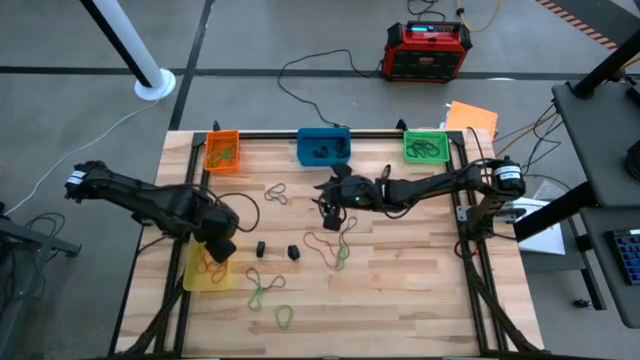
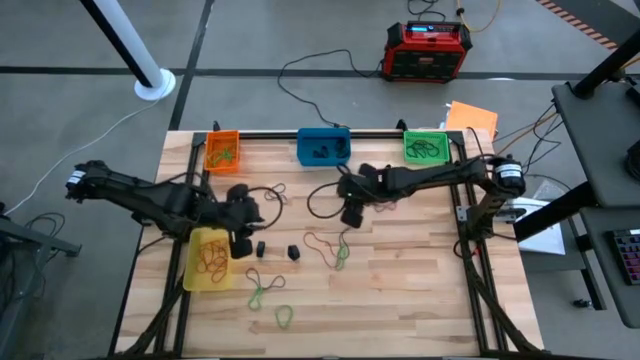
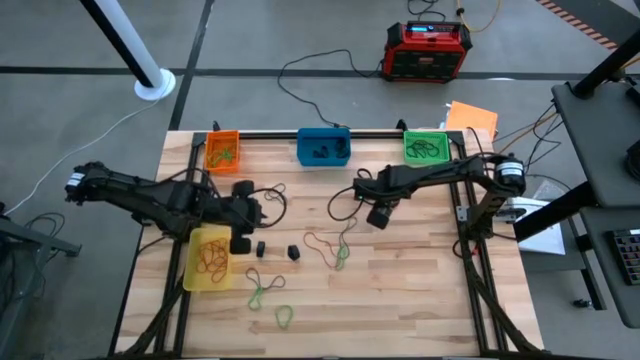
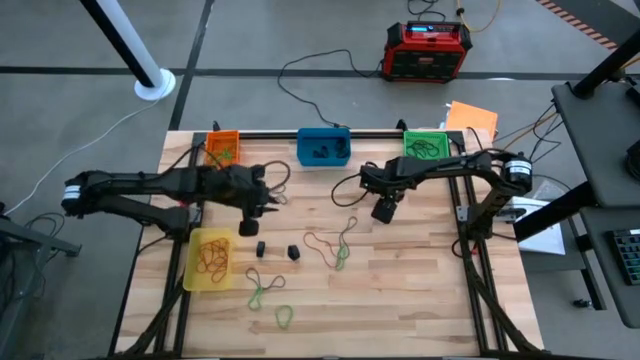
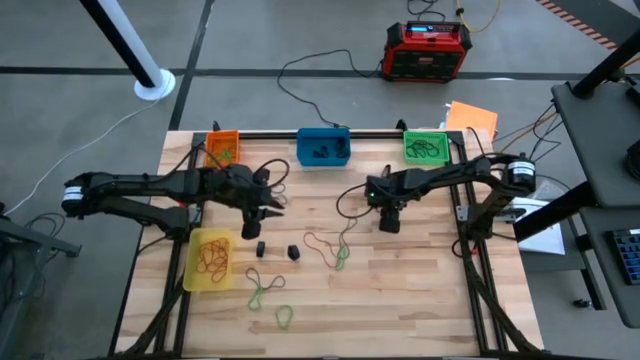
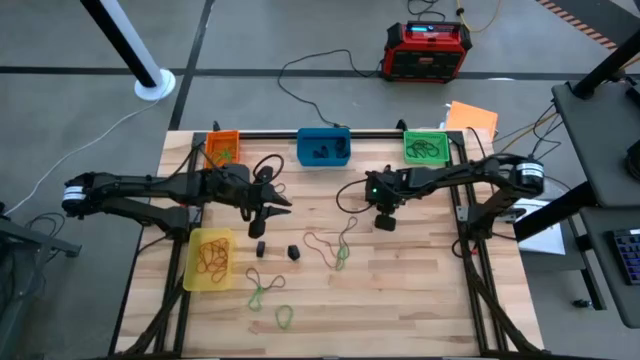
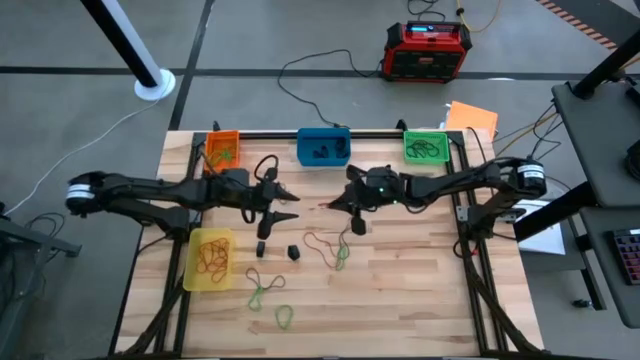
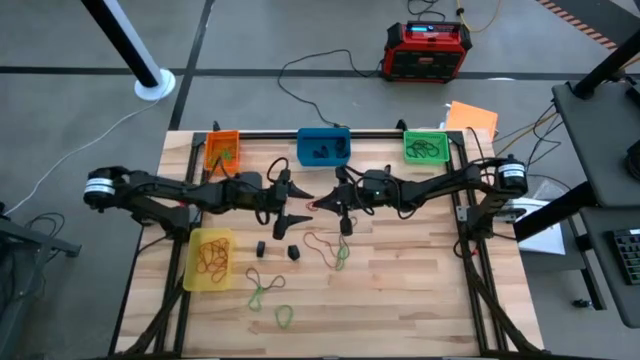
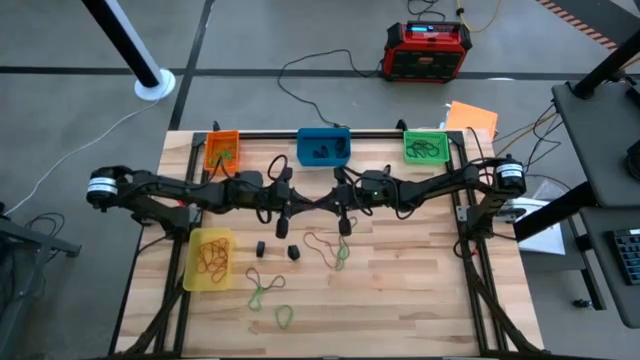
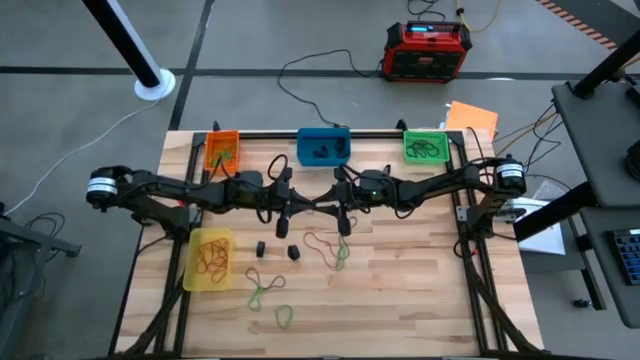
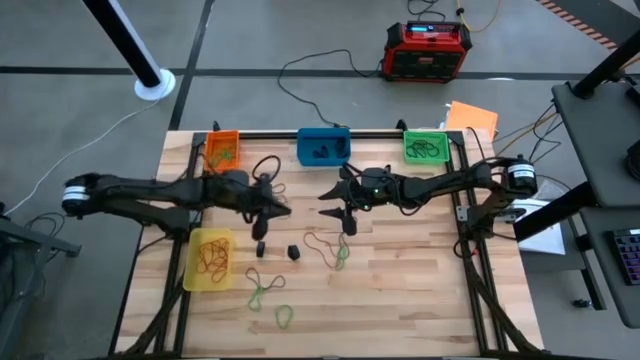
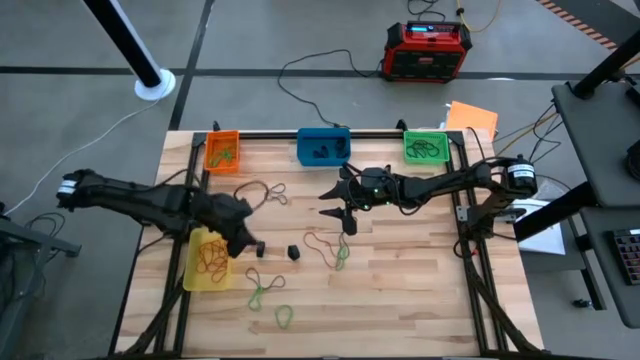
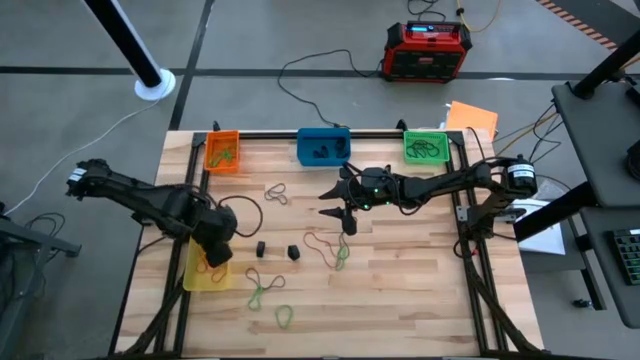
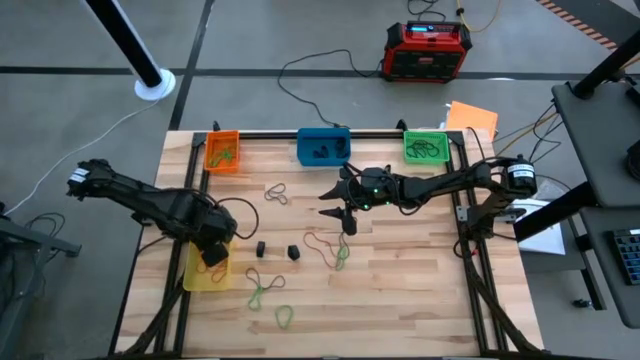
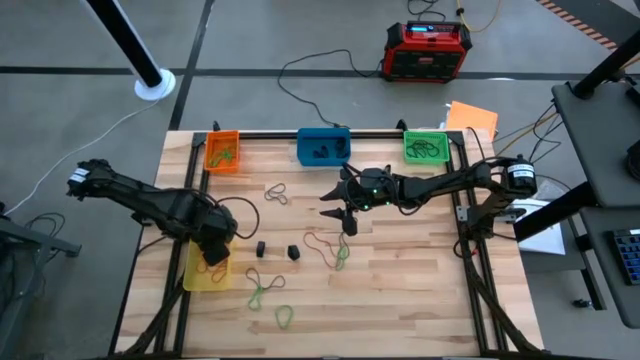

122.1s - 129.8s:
Task: Sort rubber bands into baskets
Put the right red rubber band into the yellow bin

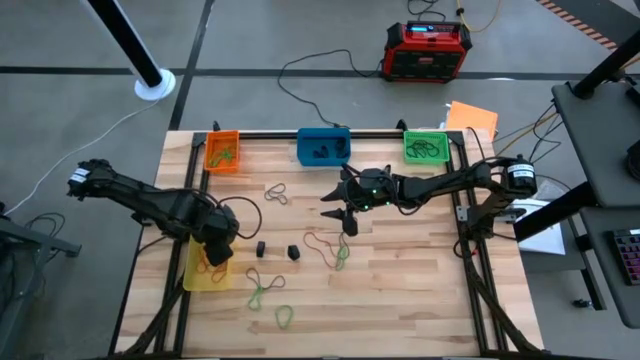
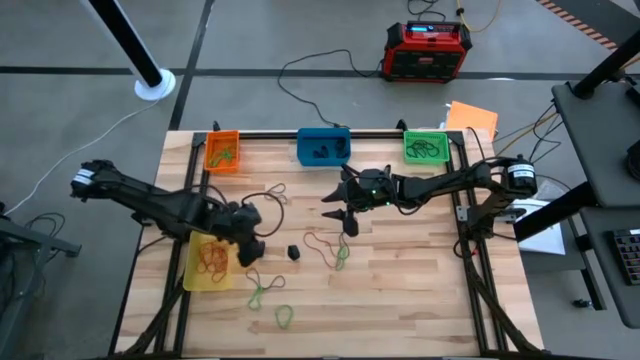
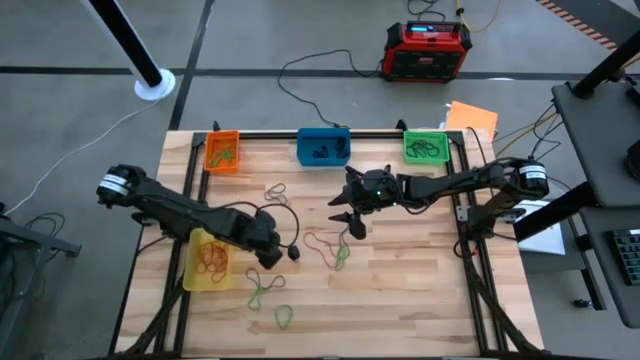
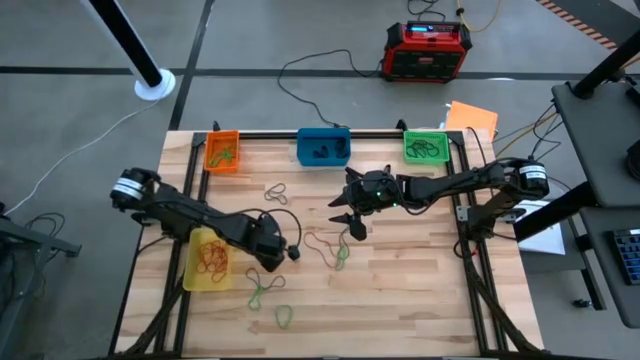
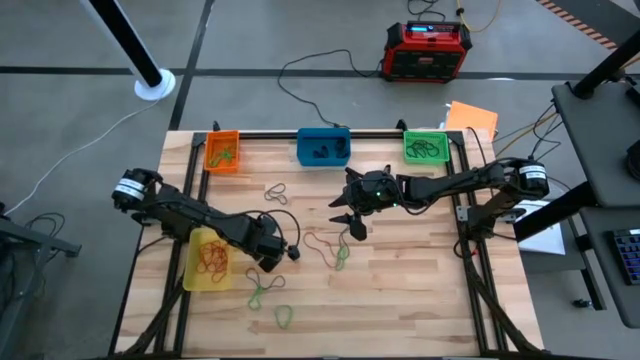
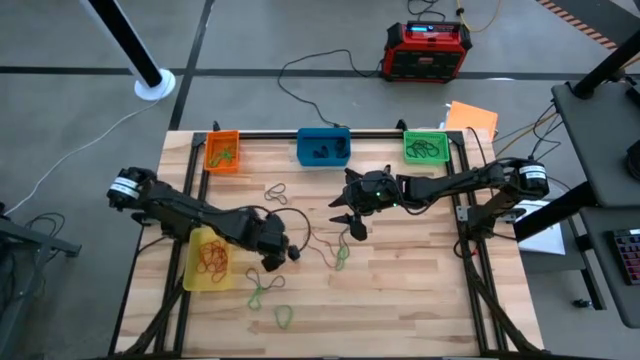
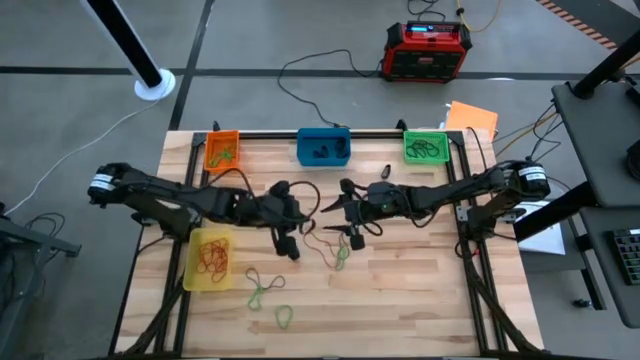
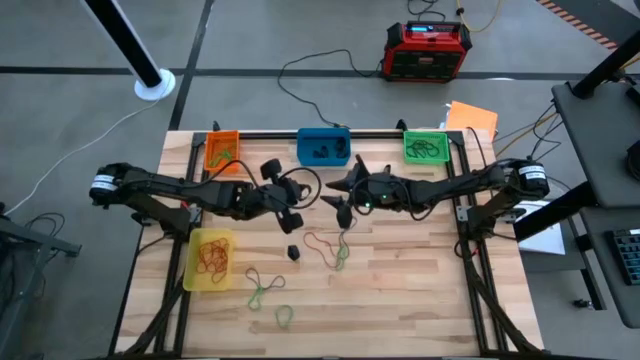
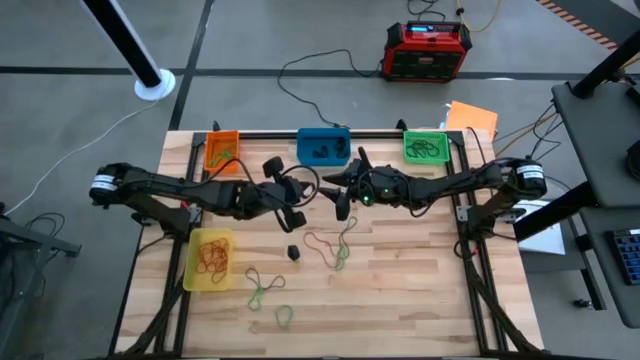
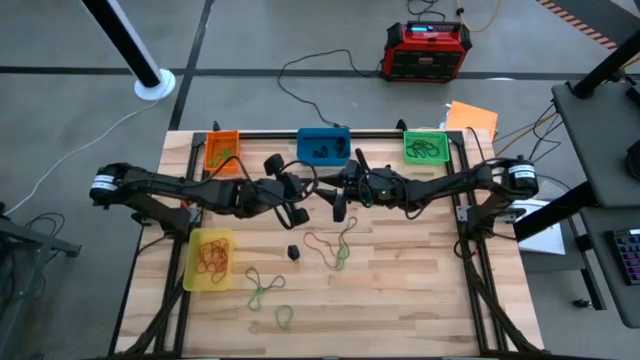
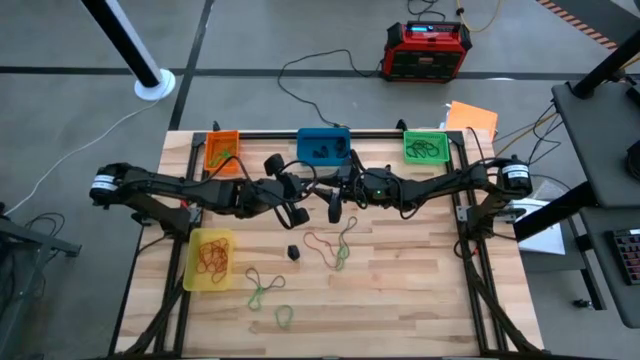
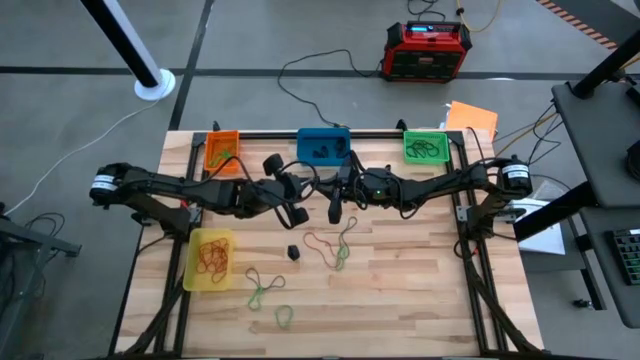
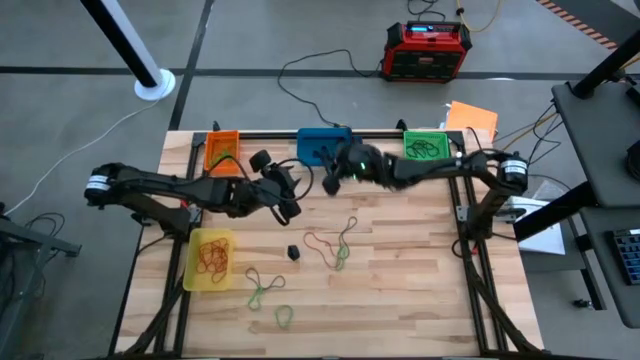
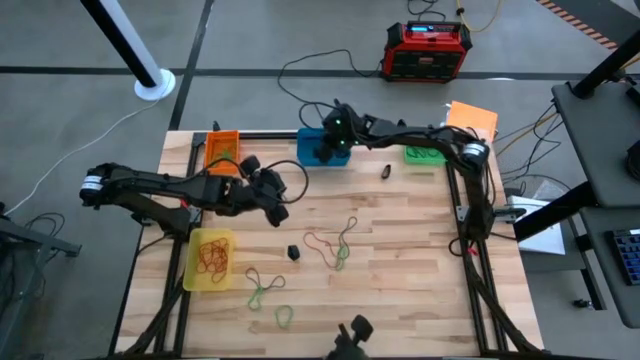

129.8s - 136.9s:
Put the left black rubber band into the blue bin

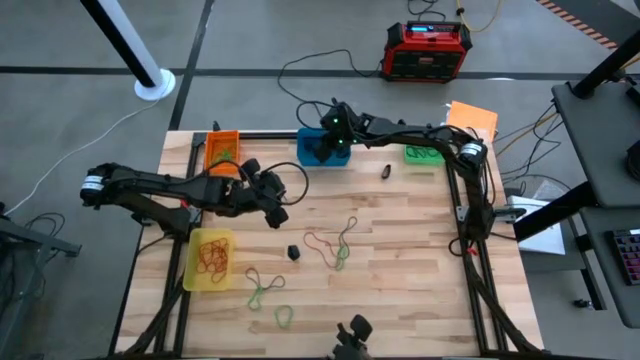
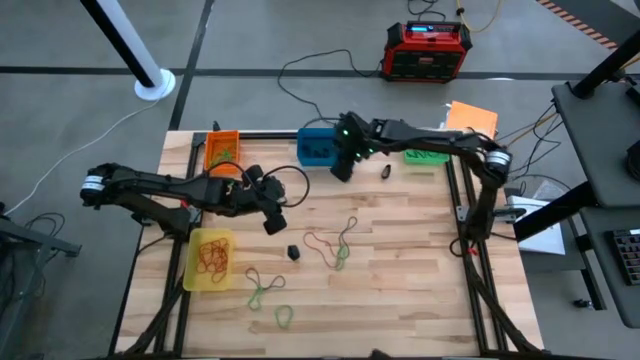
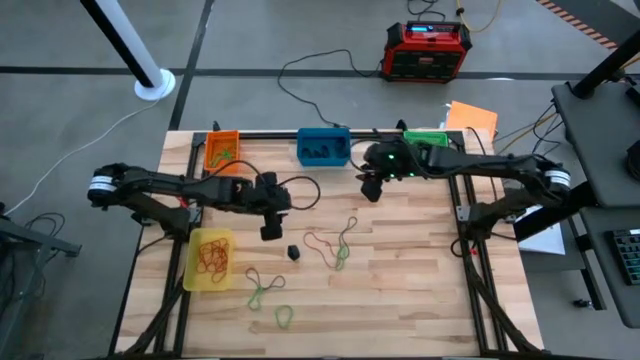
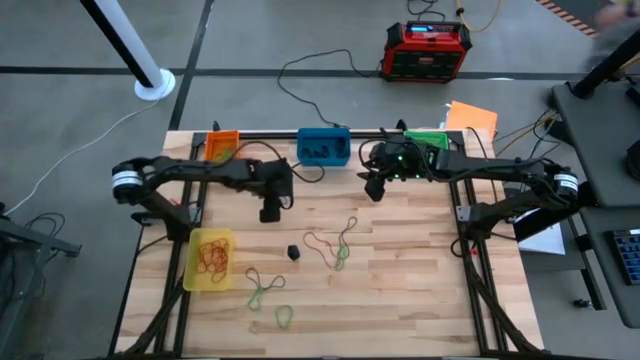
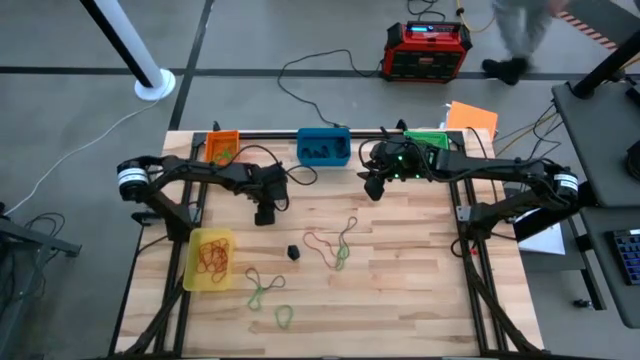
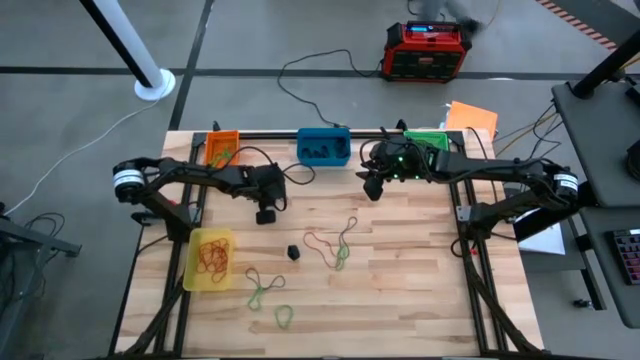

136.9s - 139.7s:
Put the left violet rubber band into the green bin

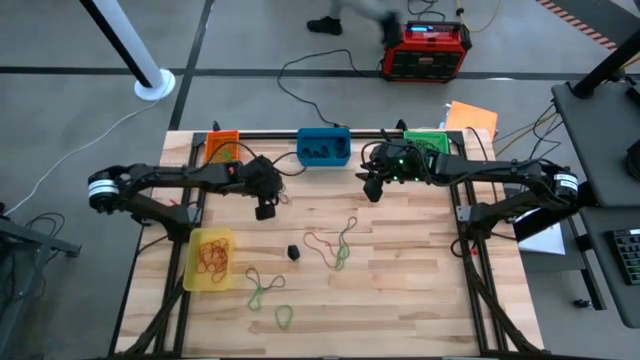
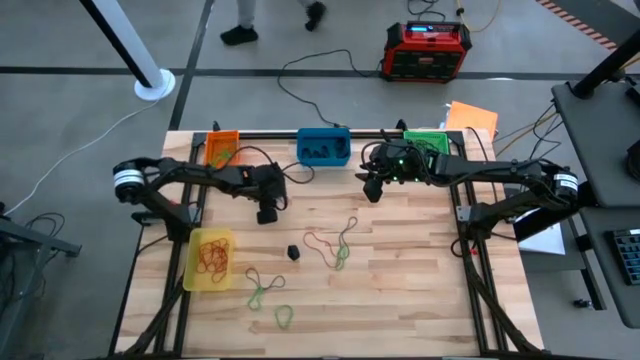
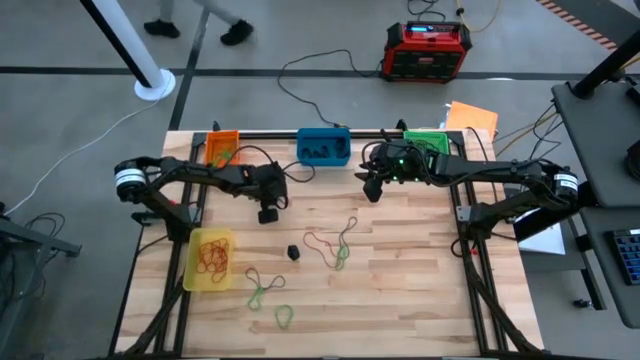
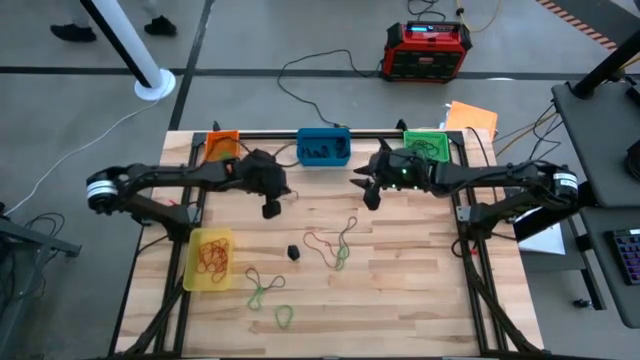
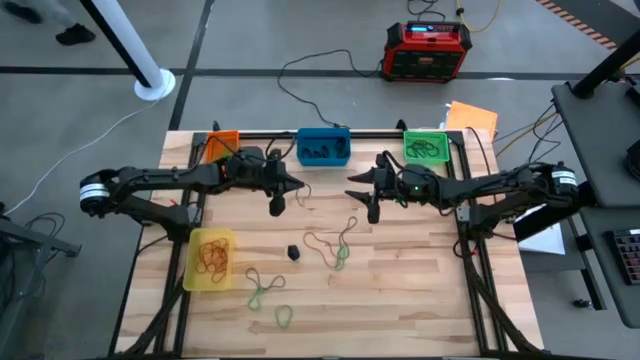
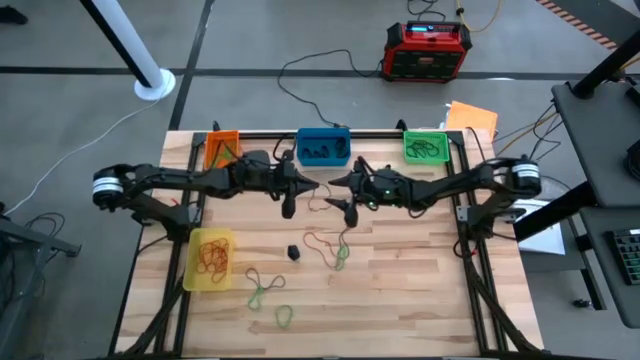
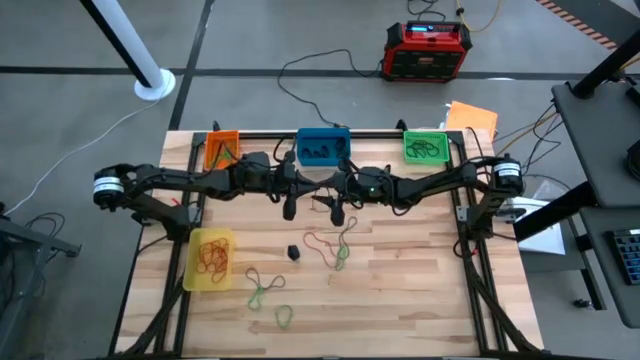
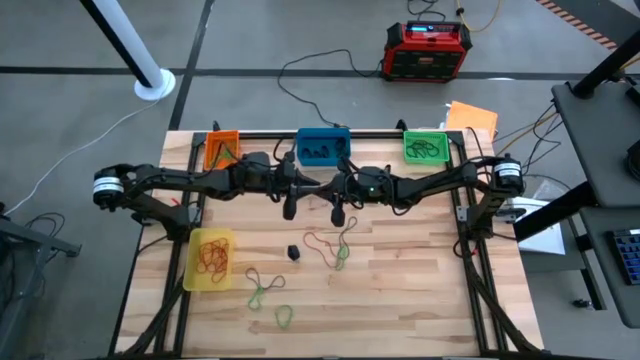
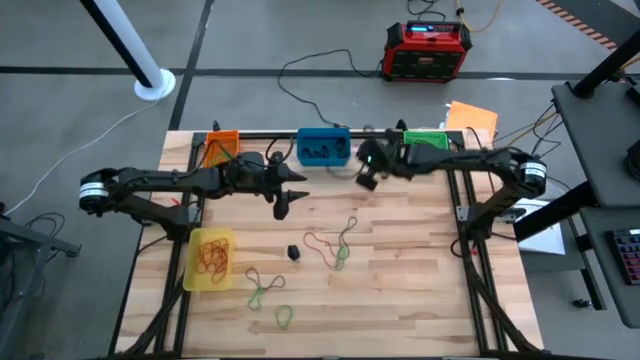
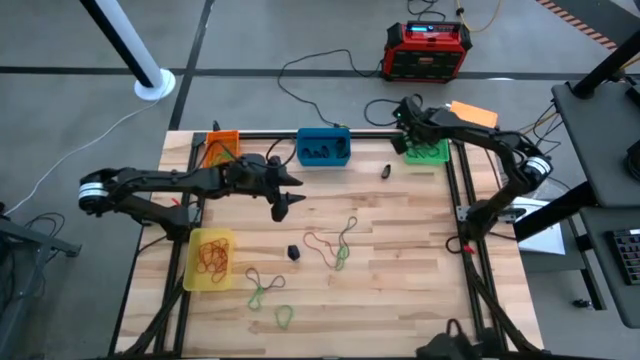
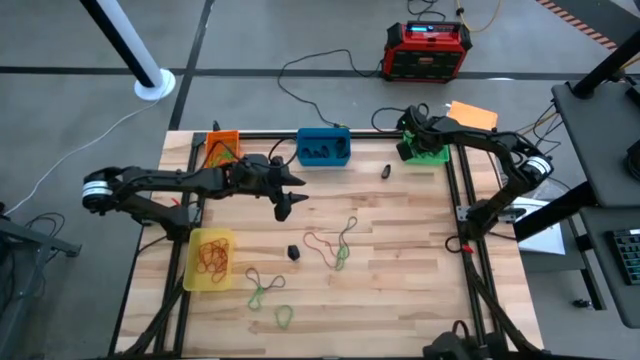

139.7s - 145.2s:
Put the left violet rubber band into the green bin
